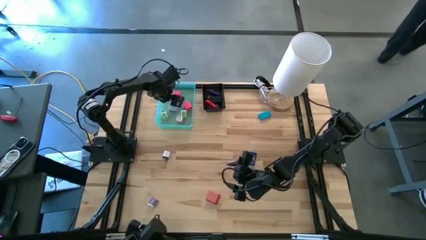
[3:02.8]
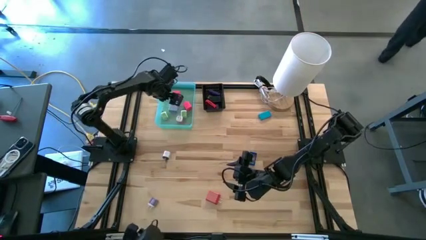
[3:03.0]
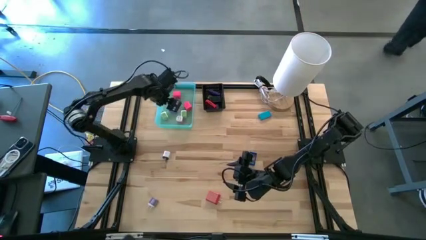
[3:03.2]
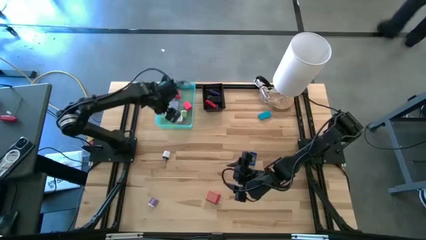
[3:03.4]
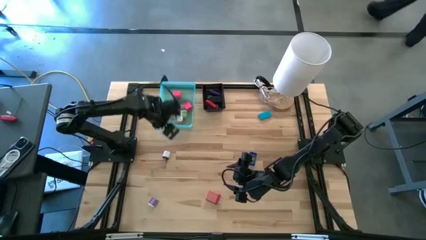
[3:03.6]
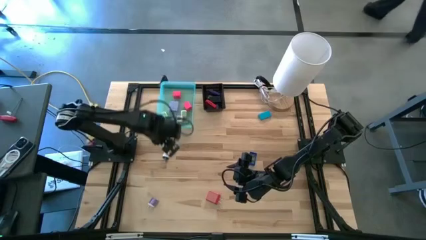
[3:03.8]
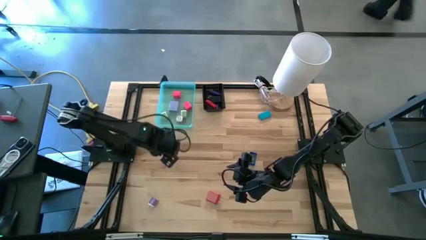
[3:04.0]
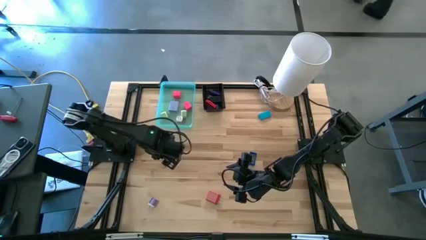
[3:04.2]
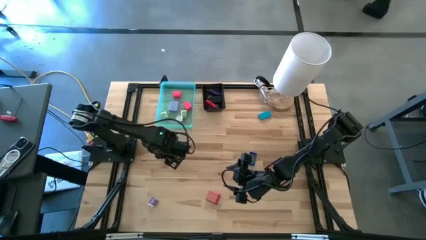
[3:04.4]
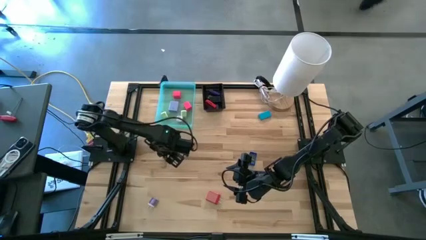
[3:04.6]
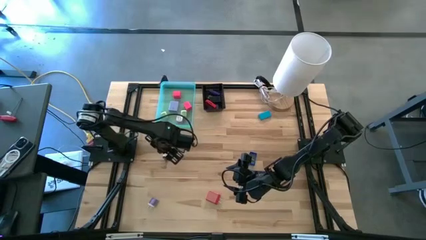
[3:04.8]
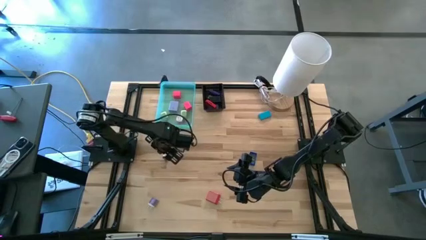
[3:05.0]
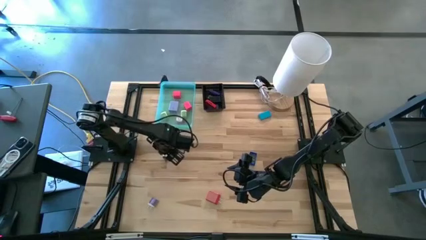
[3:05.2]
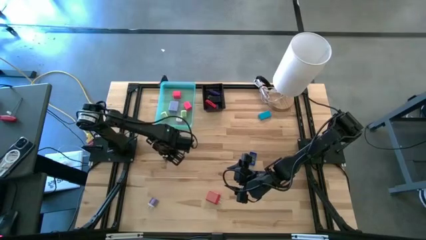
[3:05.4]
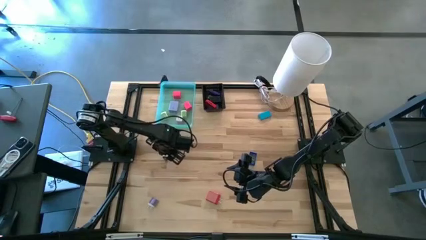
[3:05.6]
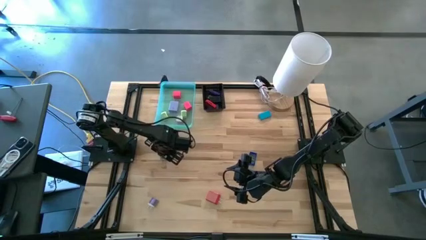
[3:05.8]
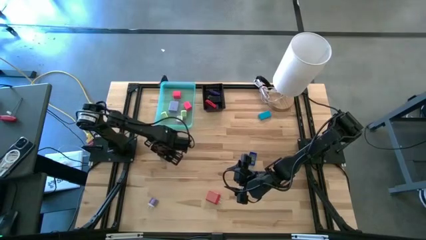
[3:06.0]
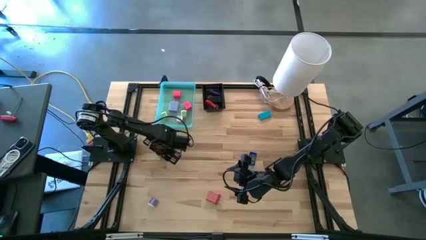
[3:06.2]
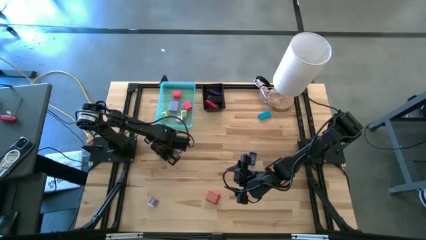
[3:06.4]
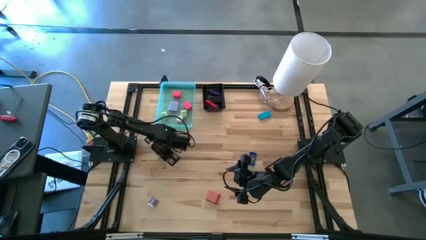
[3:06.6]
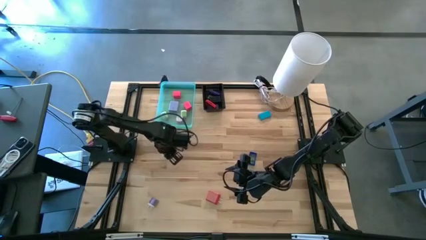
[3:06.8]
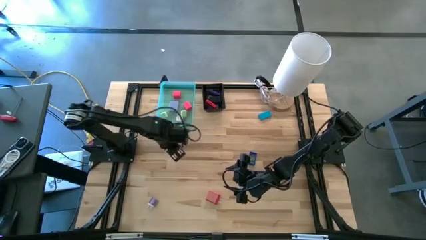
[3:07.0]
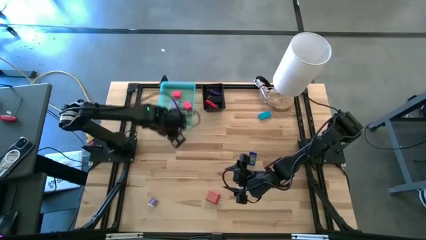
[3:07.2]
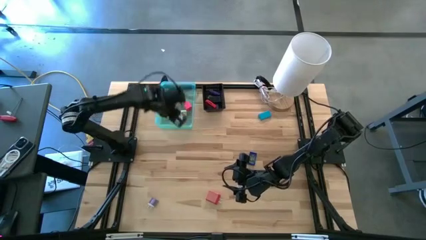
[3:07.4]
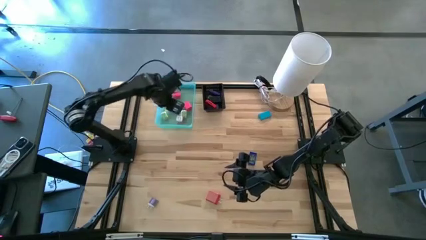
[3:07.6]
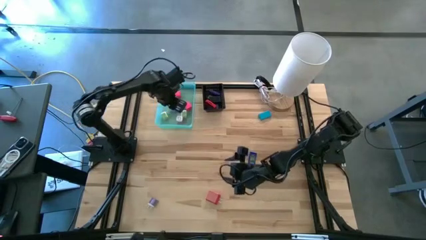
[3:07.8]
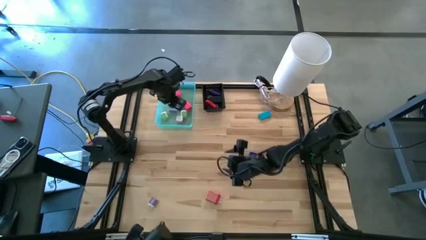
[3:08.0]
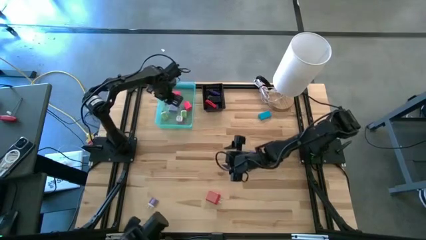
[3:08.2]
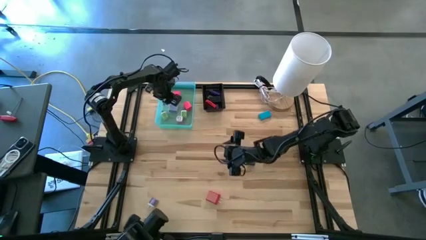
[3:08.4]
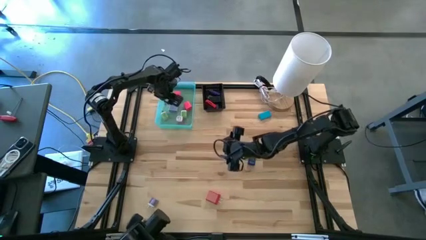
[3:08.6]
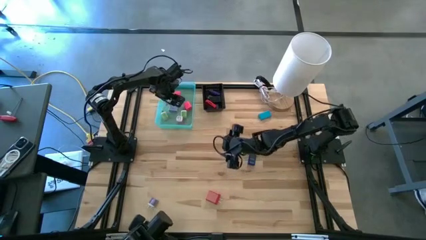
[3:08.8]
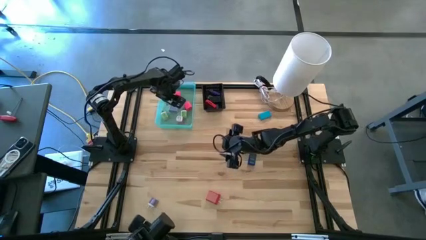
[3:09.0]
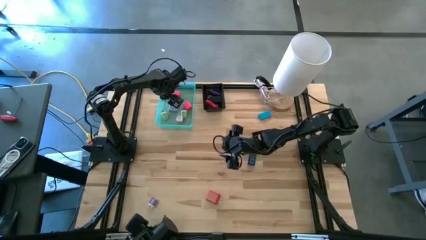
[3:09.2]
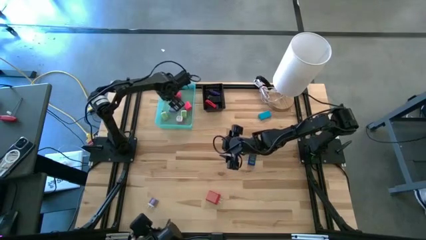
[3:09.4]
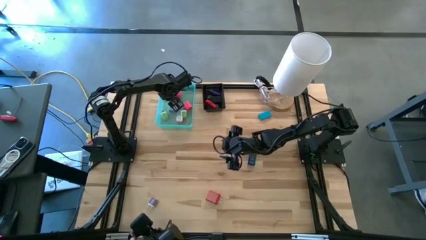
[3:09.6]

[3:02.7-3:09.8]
Task: Pick & Place Office items
Put the white charger adapter into the green bin

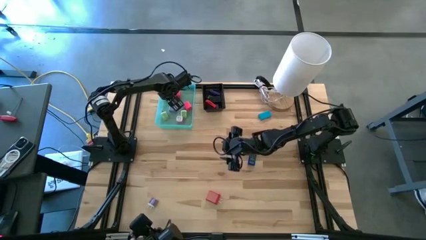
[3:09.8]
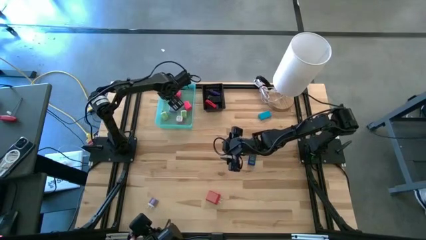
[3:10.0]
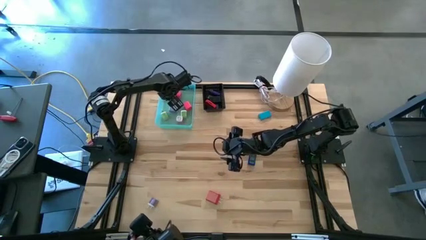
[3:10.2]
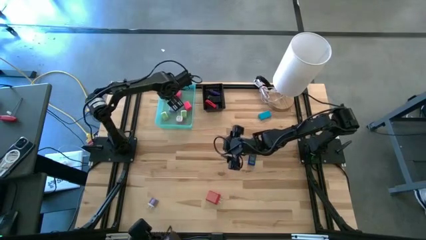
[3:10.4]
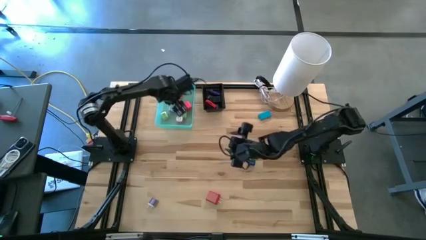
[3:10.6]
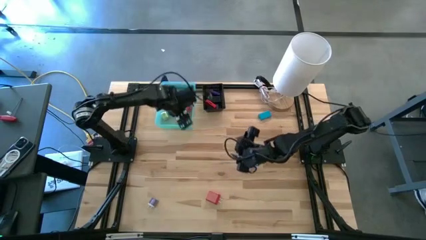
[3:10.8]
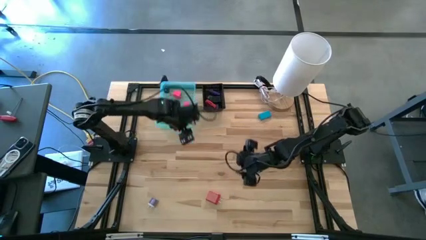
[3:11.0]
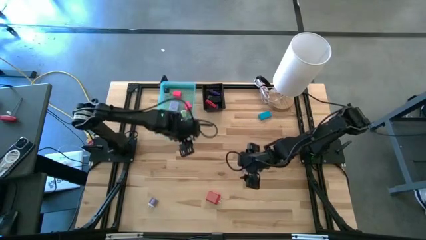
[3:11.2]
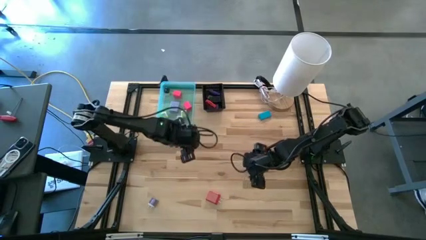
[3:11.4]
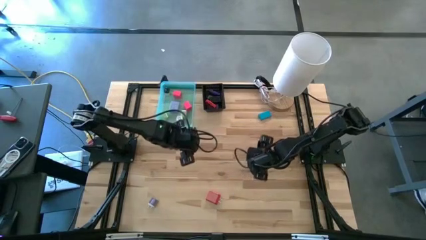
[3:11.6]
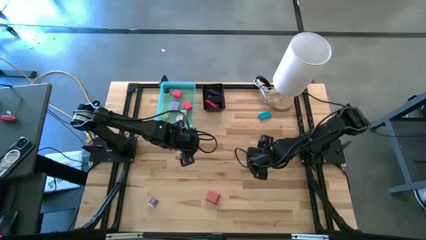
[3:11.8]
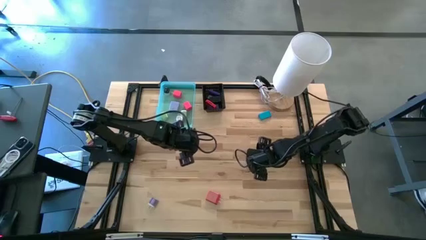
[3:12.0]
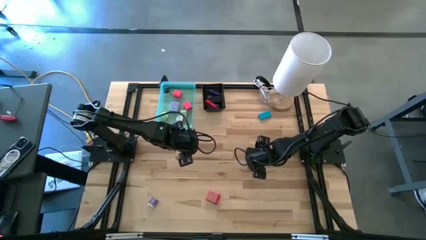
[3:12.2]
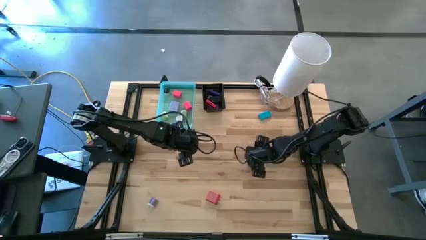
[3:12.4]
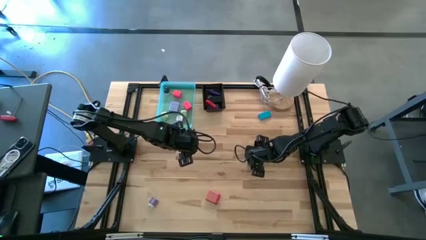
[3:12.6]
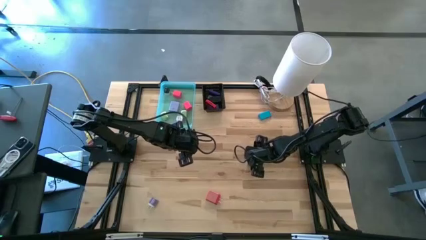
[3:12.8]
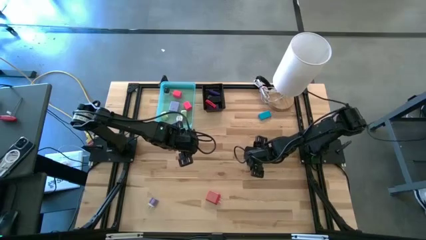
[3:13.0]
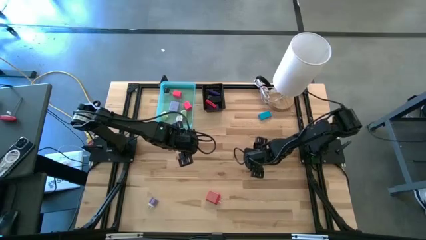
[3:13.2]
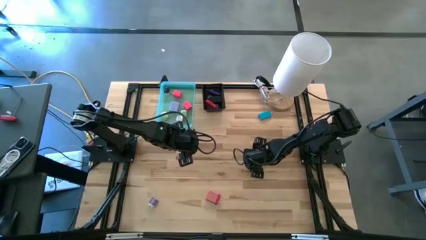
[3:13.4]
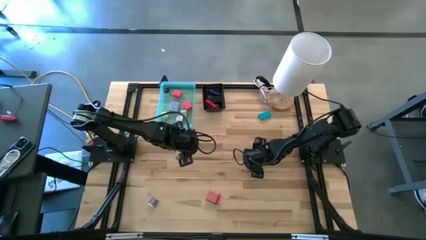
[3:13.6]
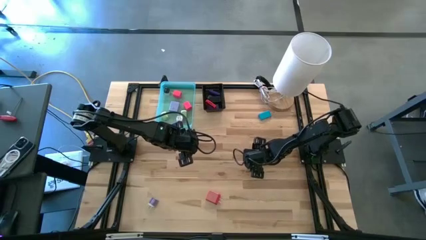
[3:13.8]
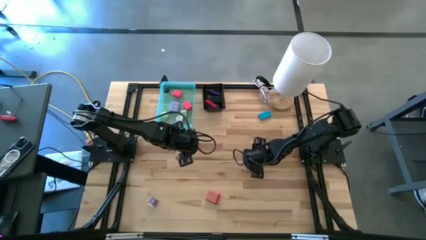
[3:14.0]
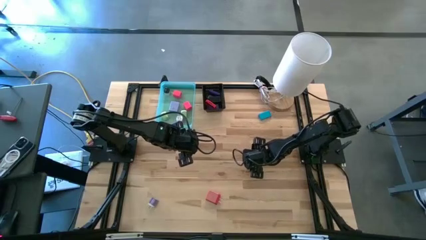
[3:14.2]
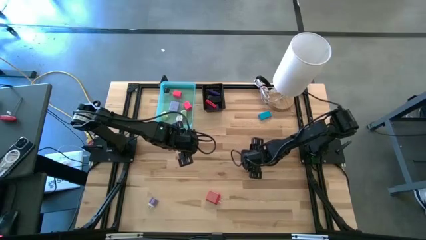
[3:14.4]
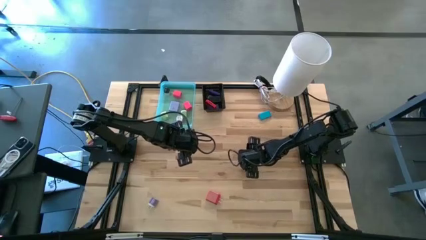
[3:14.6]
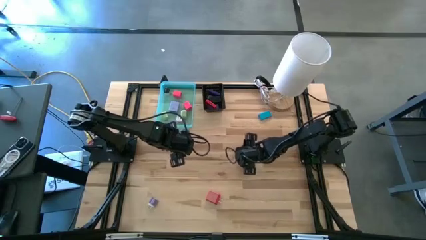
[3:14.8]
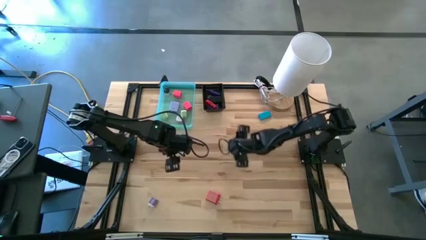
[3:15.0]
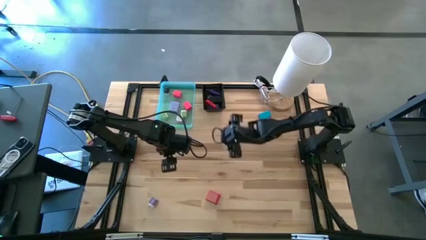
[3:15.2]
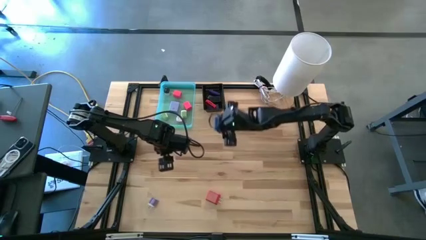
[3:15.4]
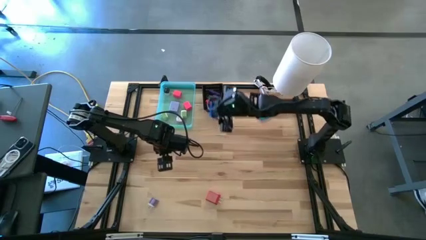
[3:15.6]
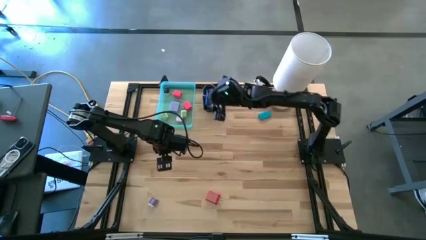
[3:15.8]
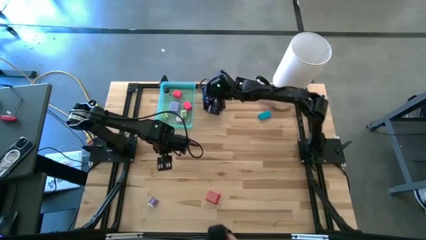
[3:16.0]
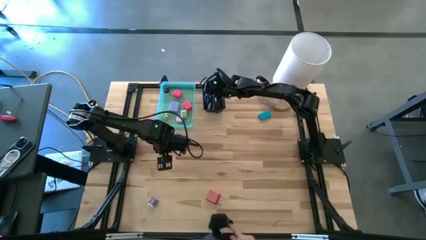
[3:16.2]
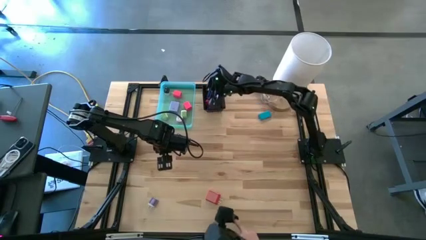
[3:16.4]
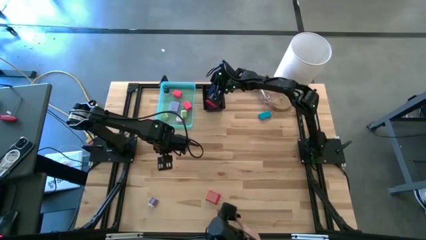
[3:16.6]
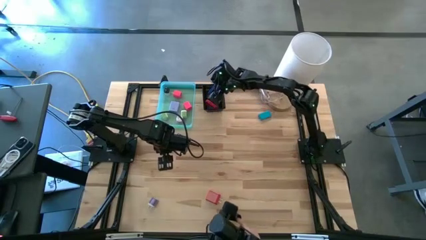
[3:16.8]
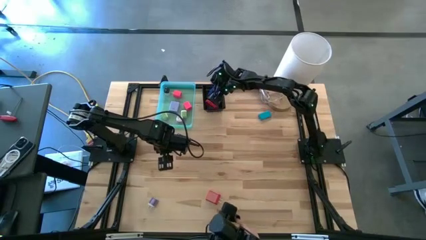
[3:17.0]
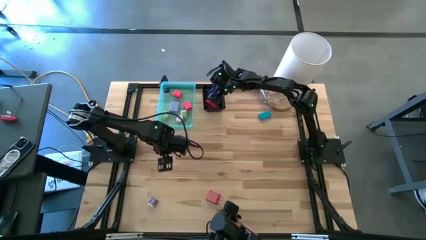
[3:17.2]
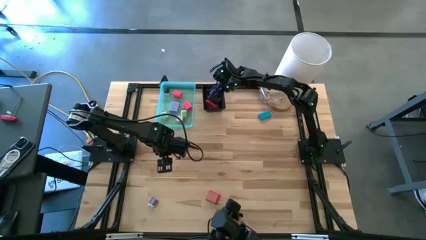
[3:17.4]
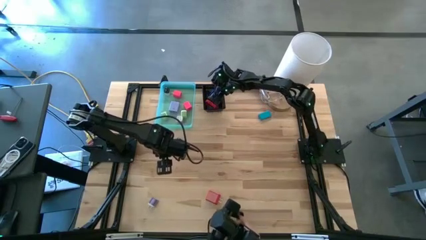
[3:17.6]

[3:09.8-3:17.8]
Put the blue timer into the black bin
